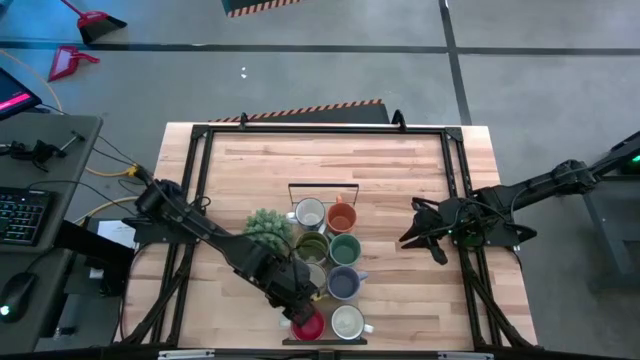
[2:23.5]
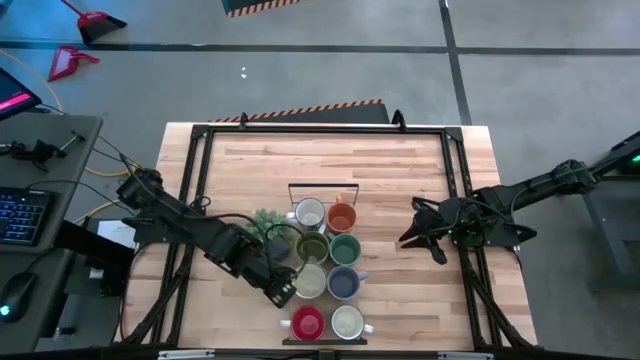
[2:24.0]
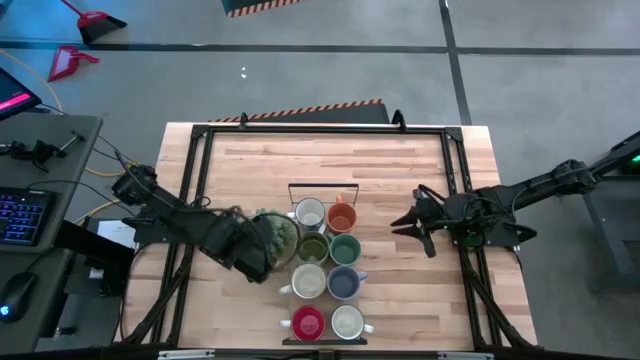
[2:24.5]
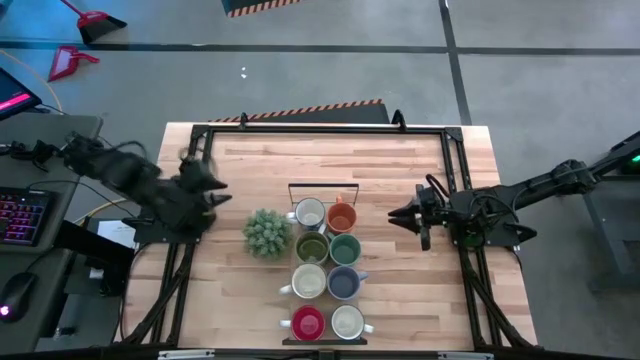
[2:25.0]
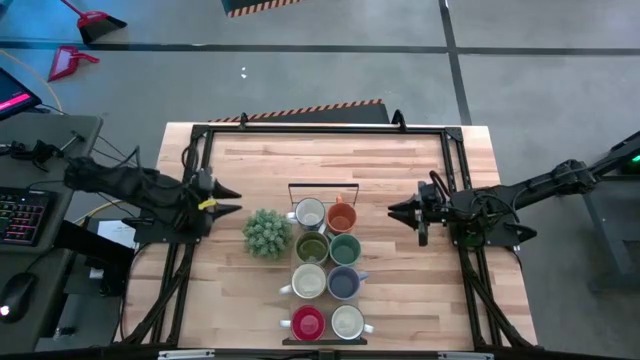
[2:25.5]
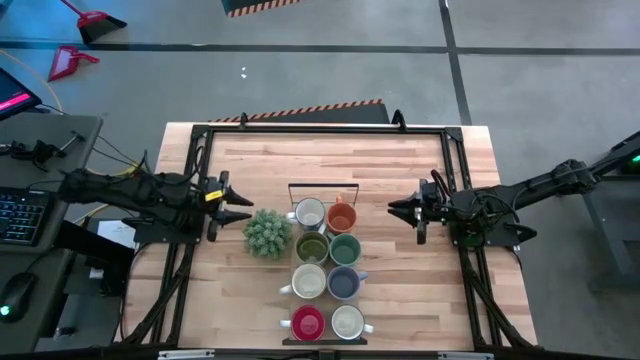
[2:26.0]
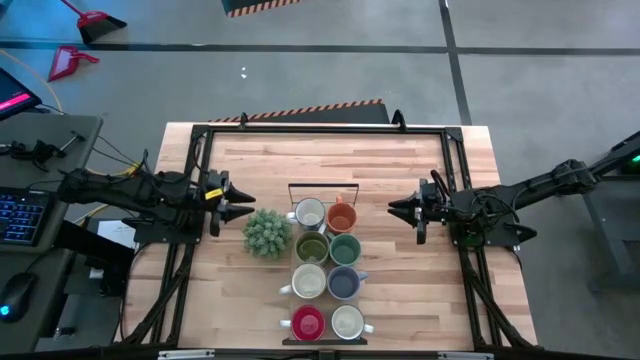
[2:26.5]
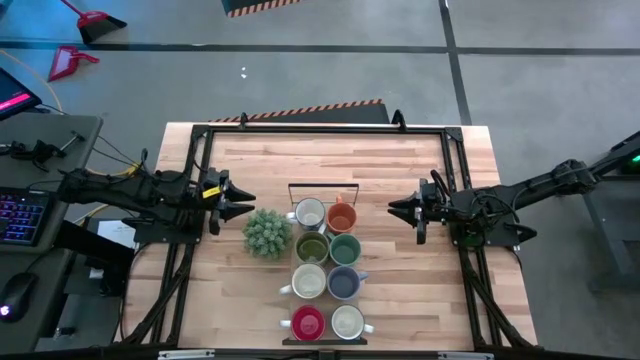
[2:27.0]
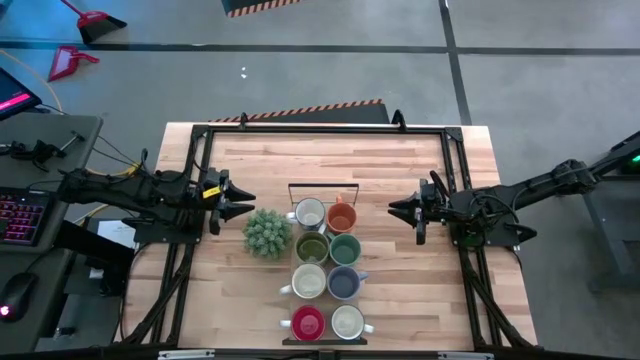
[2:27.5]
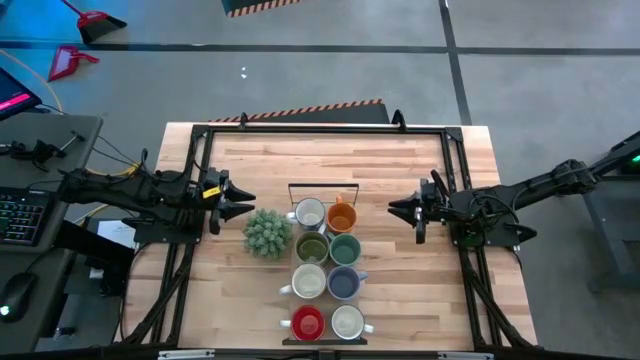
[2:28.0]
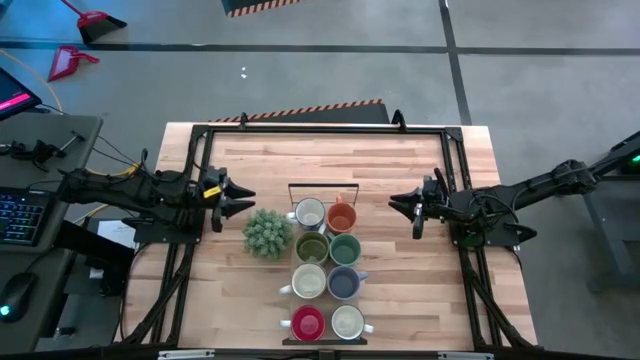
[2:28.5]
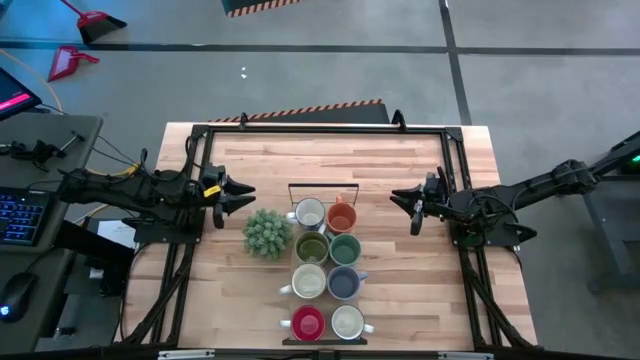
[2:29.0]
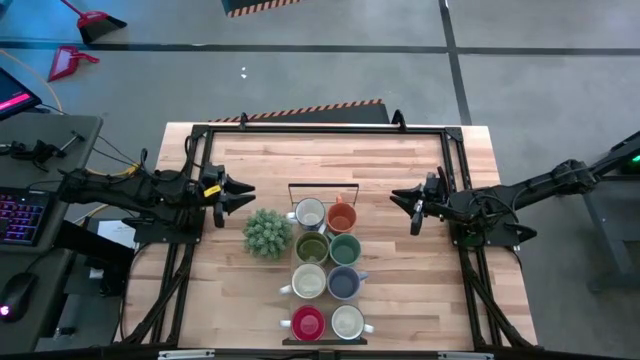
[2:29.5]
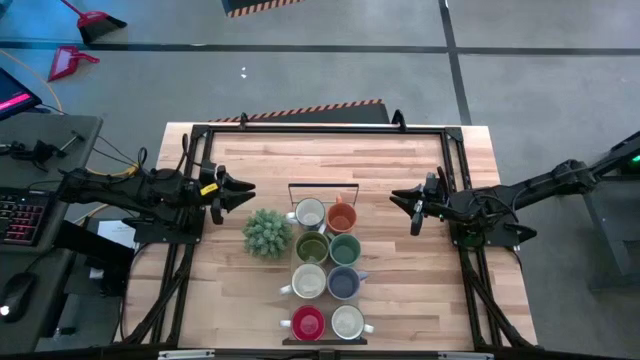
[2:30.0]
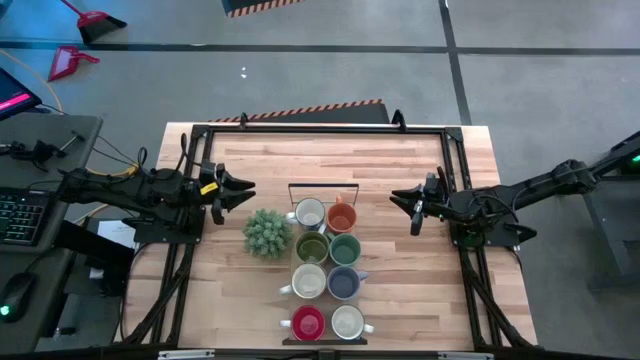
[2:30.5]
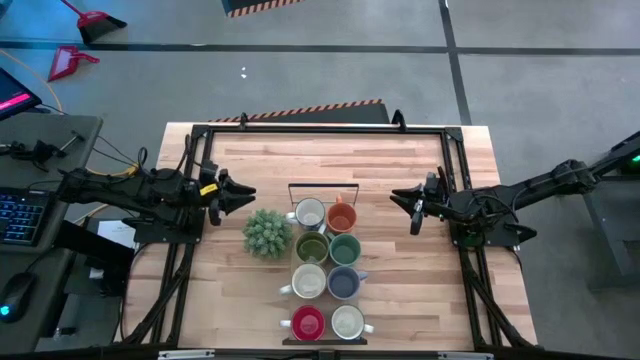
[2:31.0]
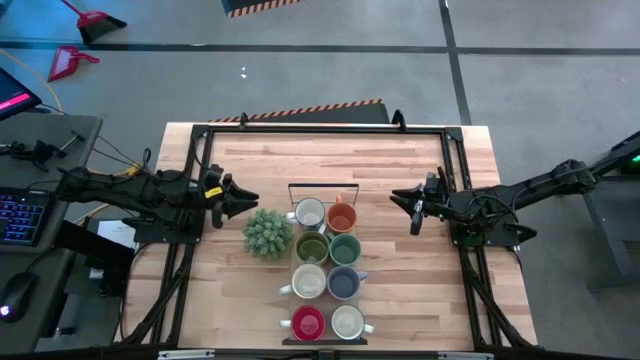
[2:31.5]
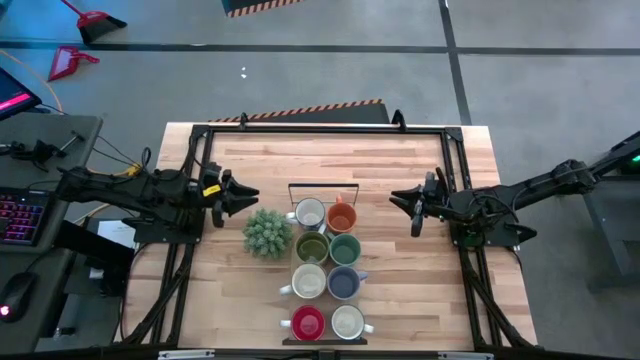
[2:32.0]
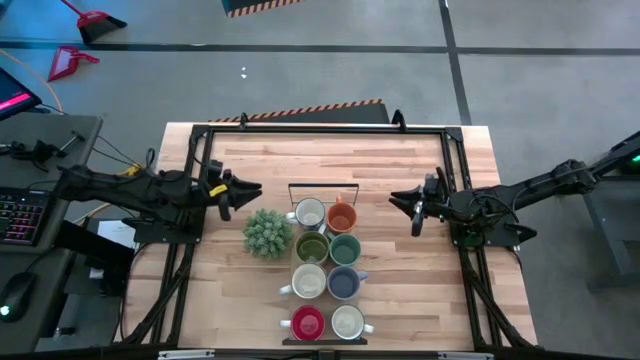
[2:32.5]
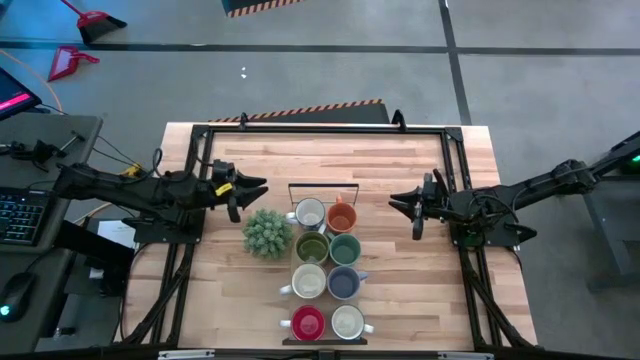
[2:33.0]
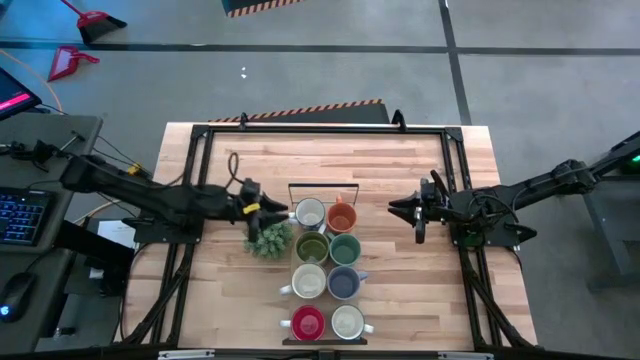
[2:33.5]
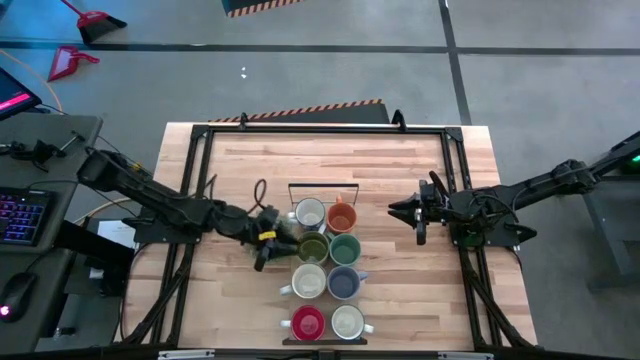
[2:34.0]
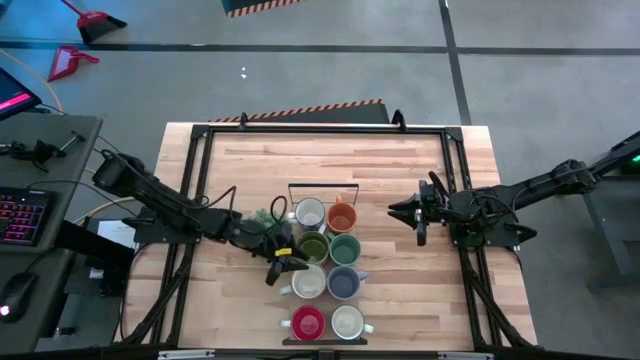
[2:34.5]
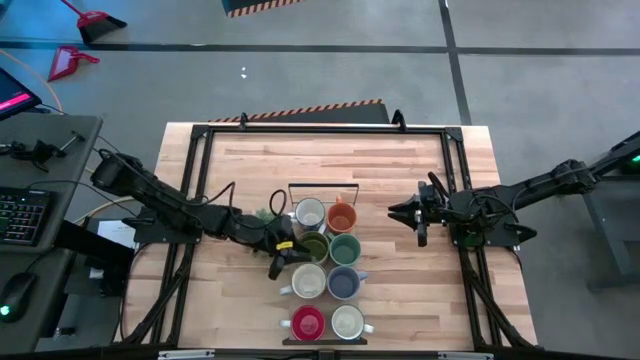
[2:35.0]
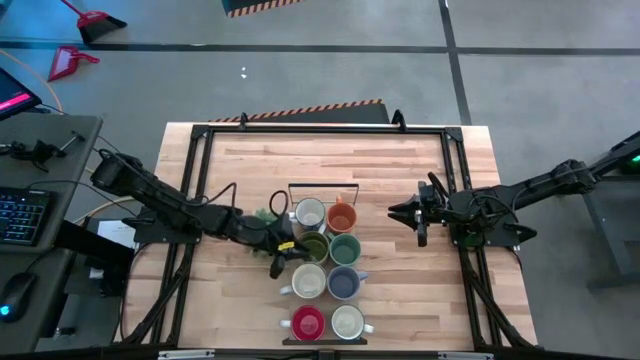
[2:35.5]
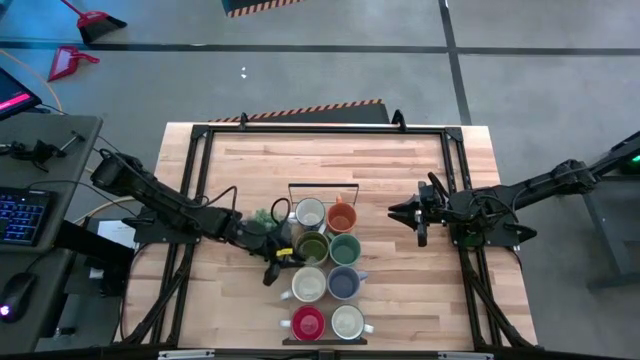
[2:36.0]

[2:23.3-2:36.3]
Task: Place coffee mugs
Adjust the yellow mug on the shelf

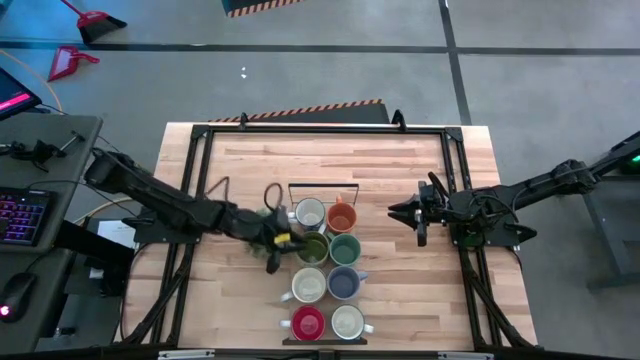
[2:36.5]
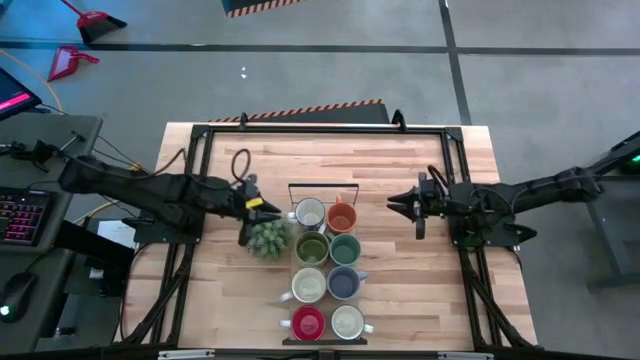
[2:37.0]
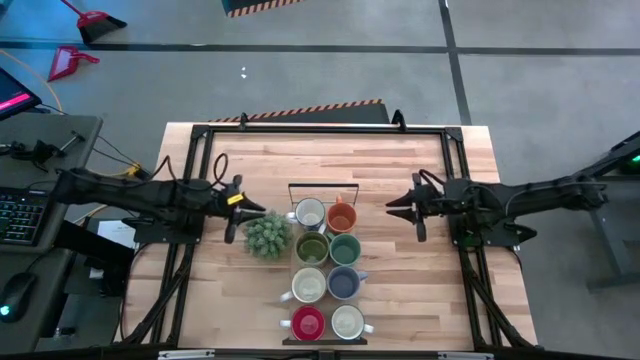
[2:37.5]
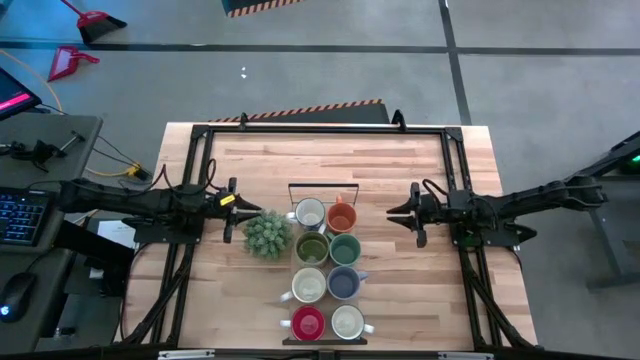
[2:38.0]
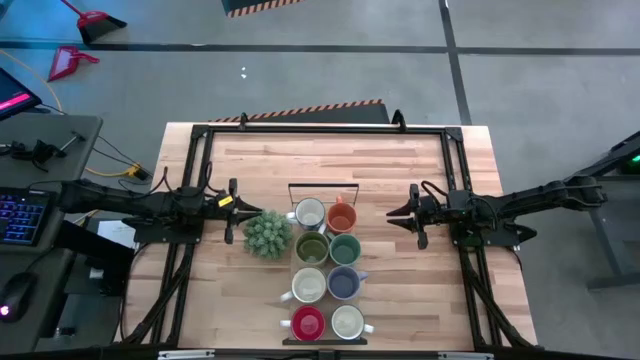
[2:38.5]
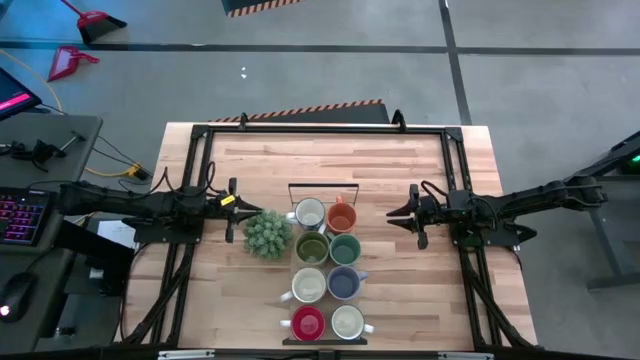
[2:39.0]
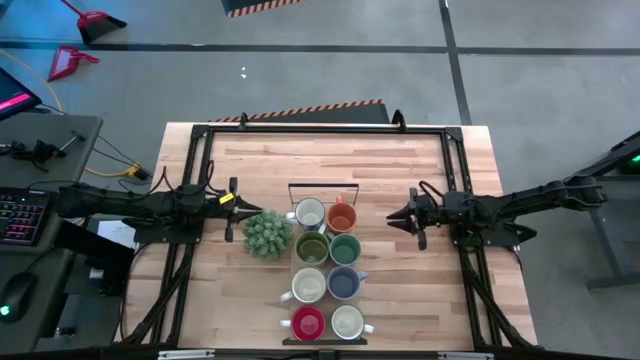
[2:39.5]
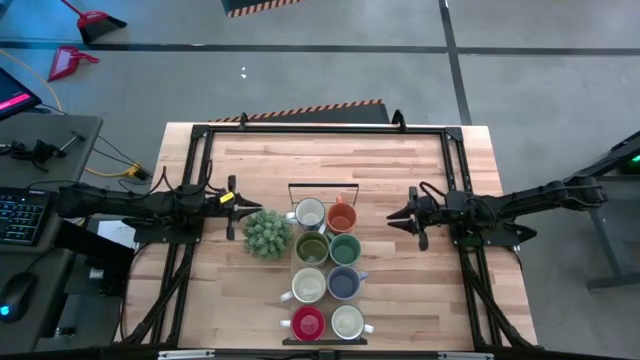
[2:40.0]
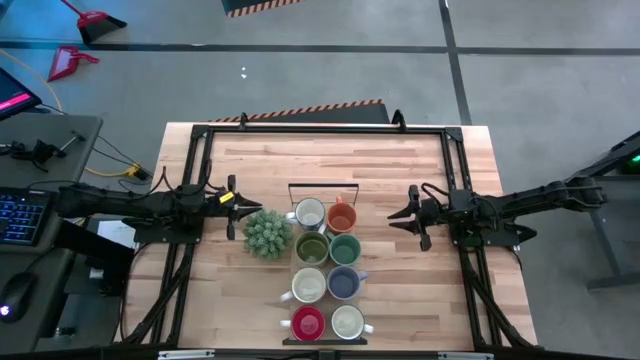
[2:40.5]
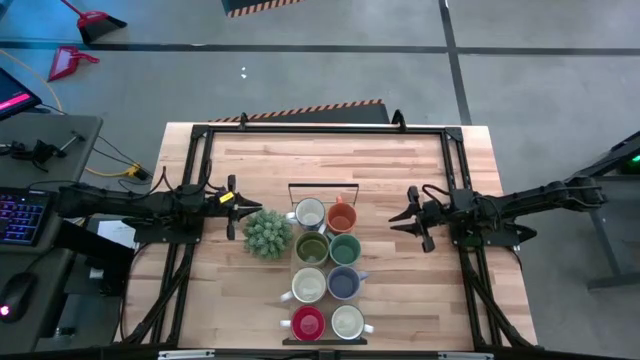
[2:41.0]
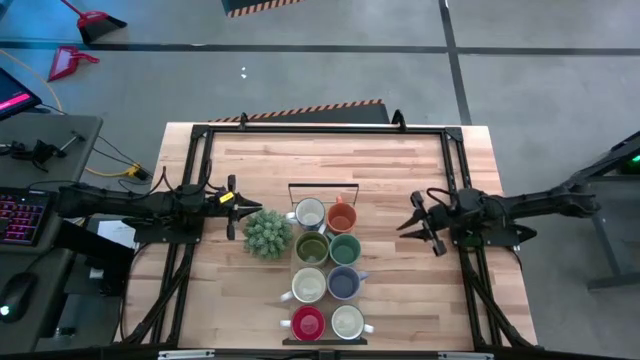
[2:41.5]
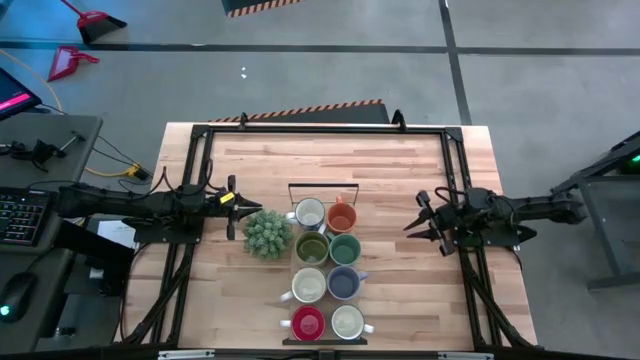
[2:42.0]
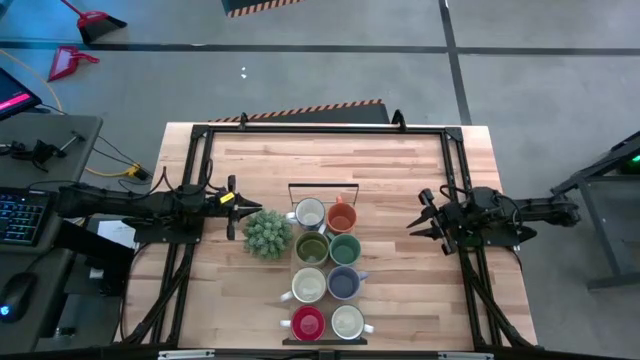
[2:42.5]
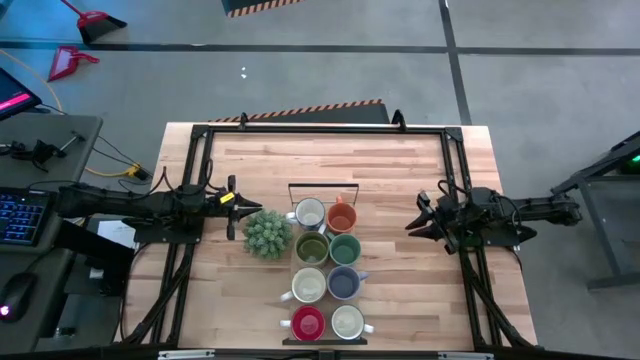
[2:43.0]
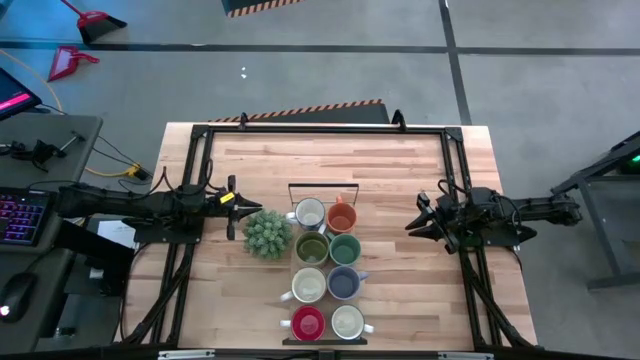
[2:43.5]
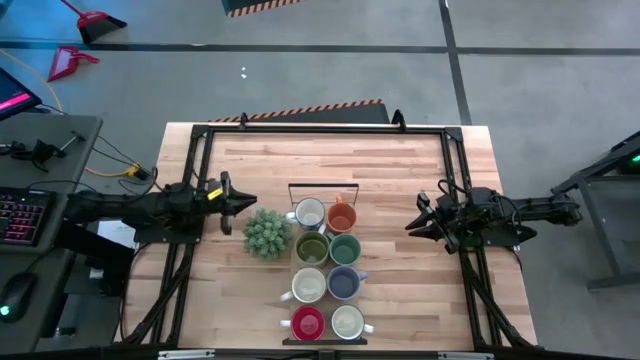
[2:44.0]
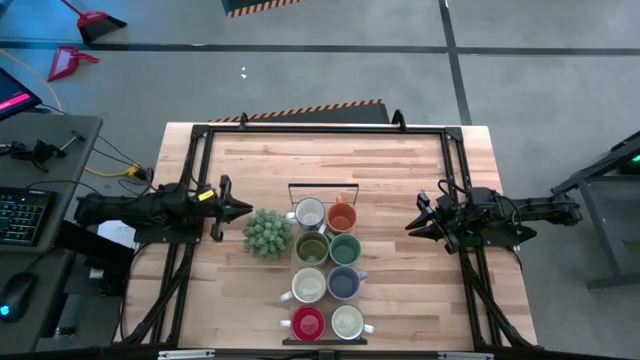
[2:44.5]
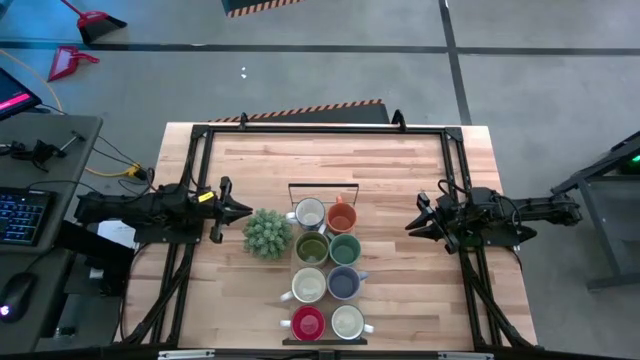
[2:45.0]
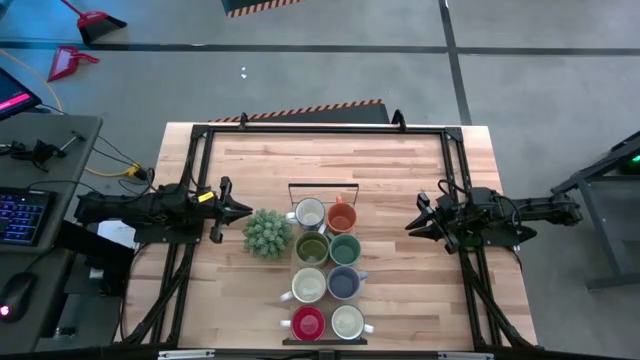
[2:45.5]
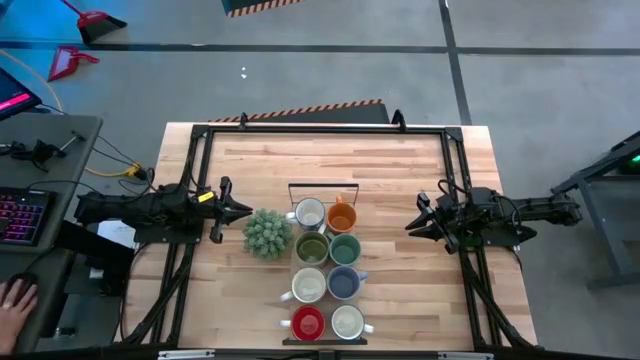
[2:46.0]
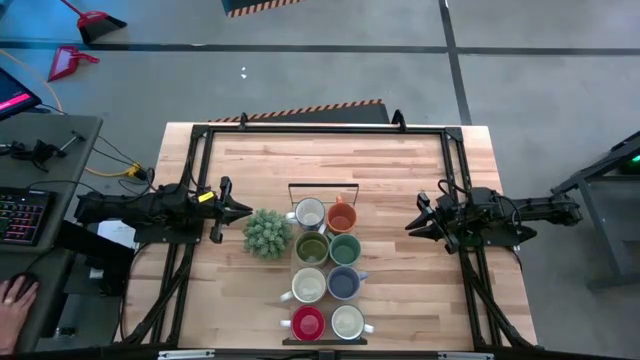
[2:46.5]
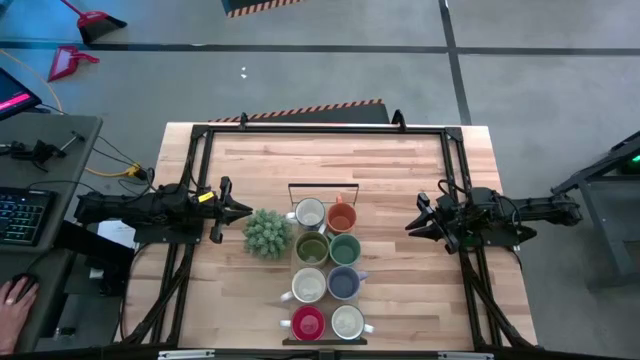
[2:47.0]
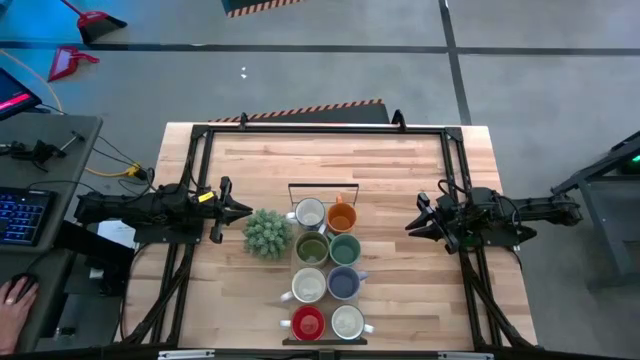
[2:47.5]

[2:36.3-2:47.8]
Return to Home Position
